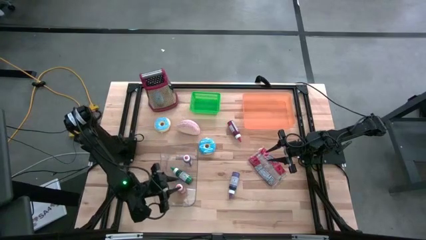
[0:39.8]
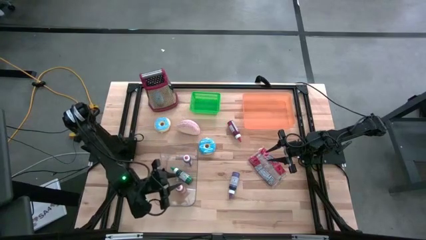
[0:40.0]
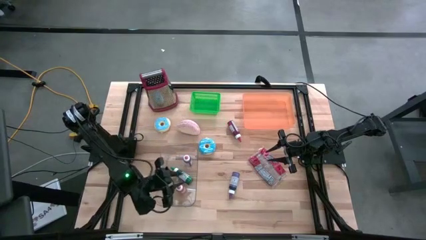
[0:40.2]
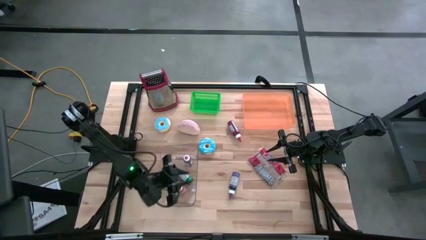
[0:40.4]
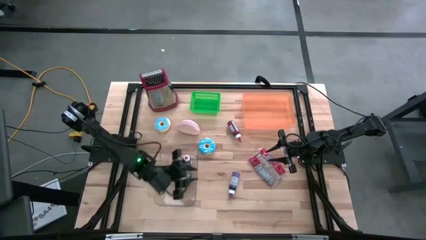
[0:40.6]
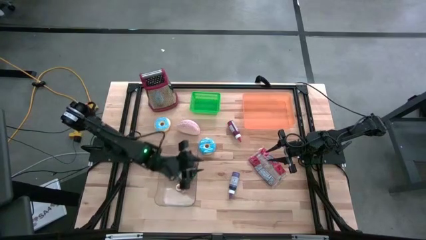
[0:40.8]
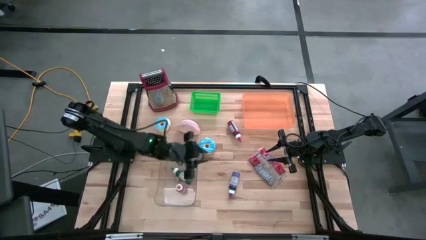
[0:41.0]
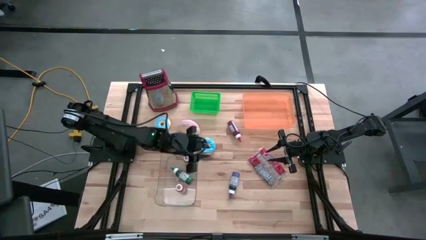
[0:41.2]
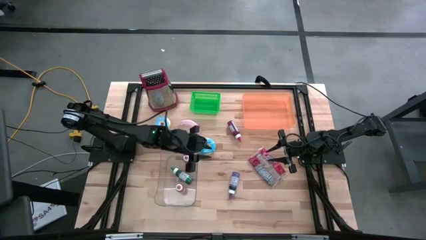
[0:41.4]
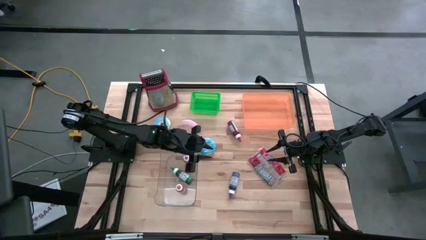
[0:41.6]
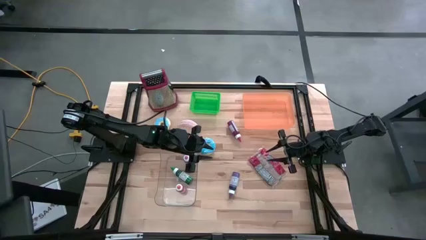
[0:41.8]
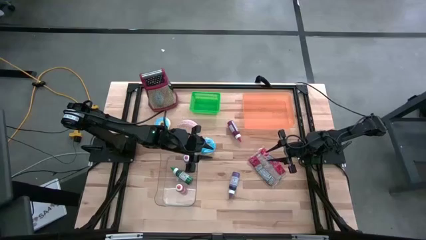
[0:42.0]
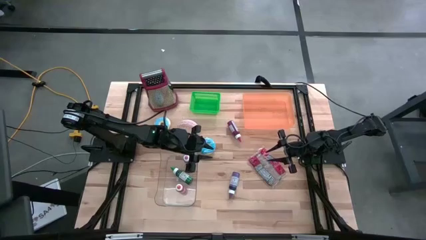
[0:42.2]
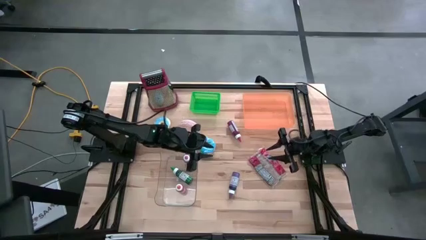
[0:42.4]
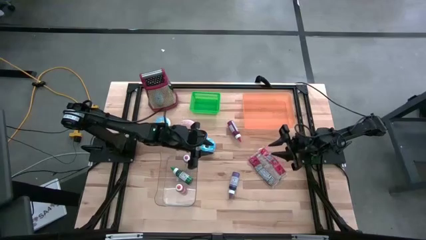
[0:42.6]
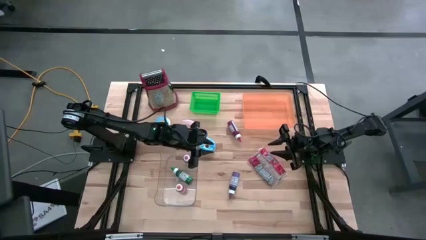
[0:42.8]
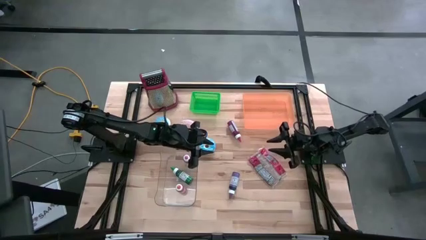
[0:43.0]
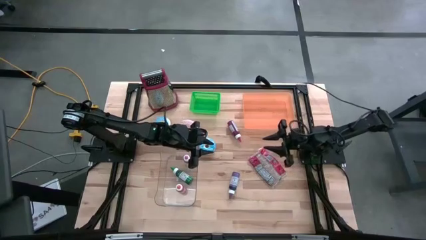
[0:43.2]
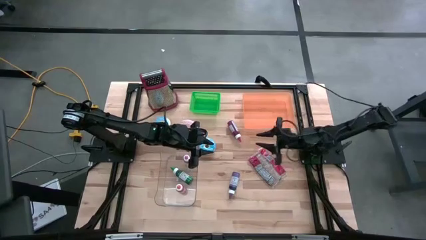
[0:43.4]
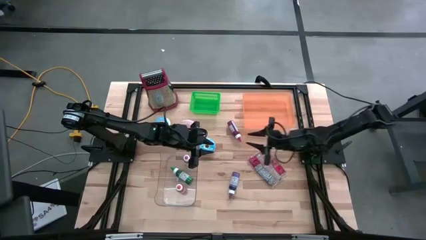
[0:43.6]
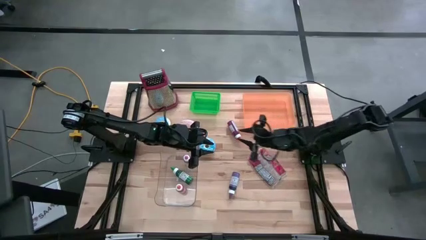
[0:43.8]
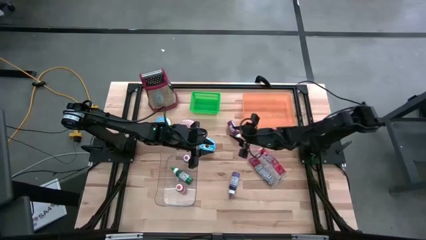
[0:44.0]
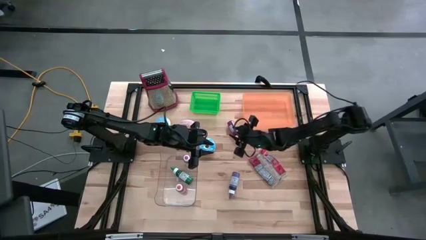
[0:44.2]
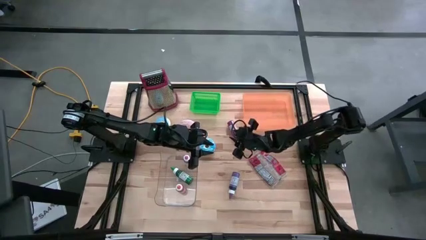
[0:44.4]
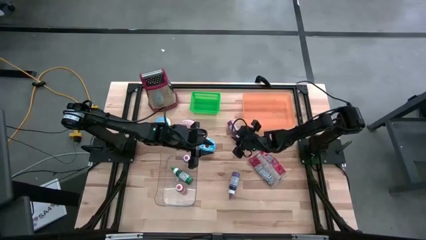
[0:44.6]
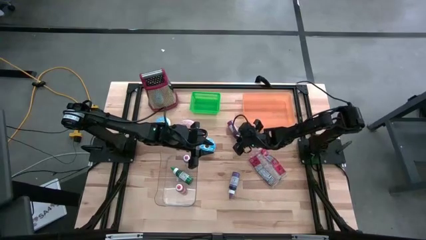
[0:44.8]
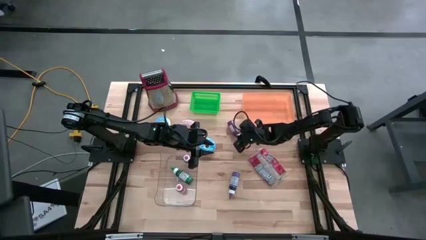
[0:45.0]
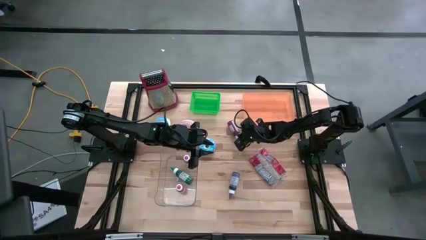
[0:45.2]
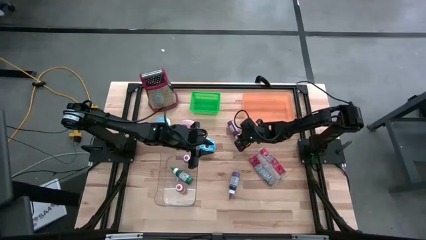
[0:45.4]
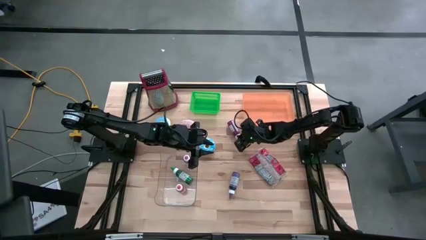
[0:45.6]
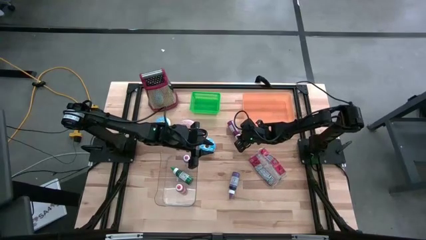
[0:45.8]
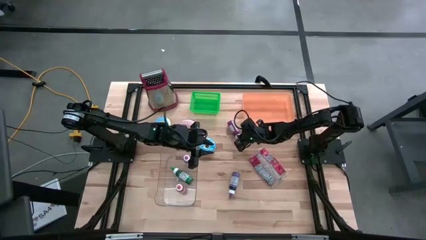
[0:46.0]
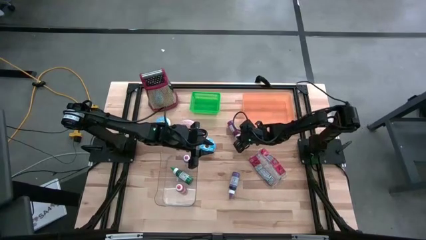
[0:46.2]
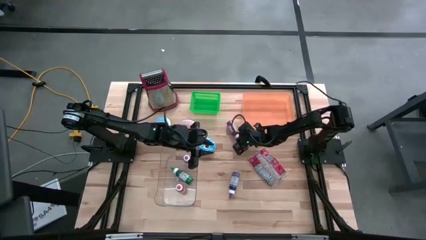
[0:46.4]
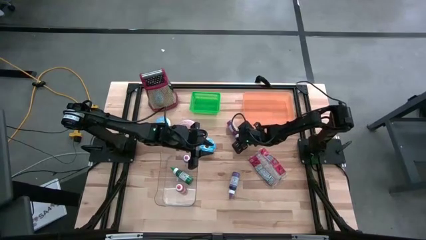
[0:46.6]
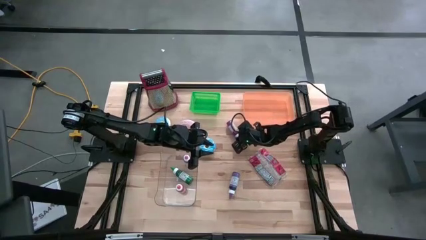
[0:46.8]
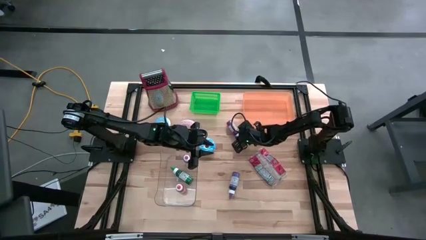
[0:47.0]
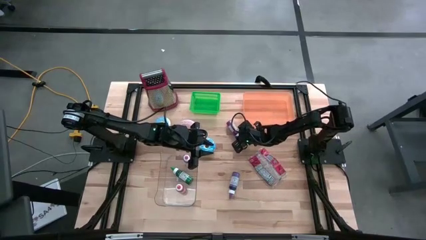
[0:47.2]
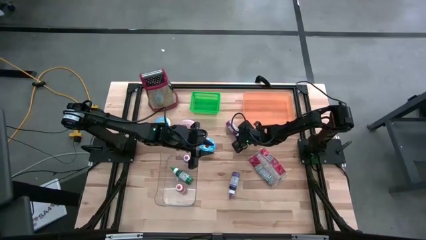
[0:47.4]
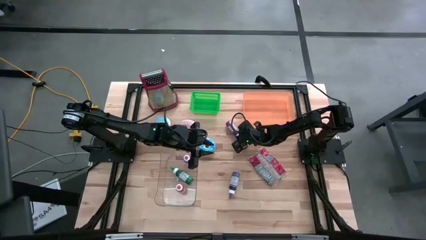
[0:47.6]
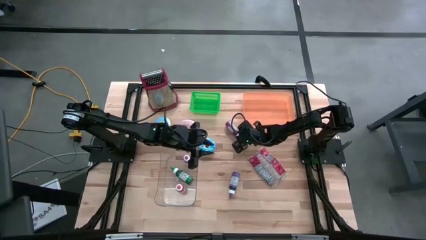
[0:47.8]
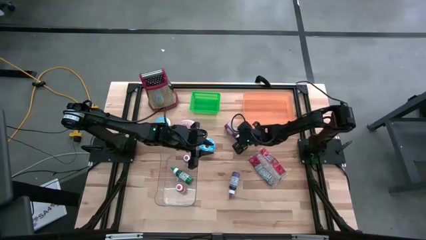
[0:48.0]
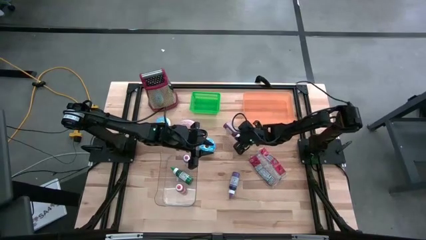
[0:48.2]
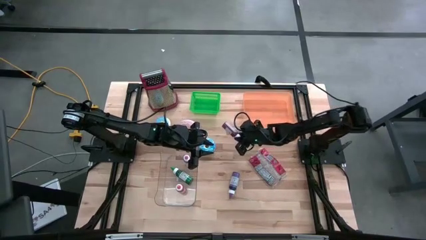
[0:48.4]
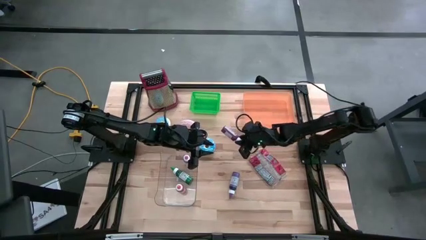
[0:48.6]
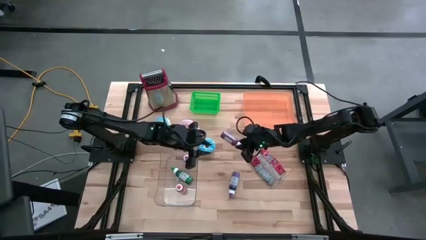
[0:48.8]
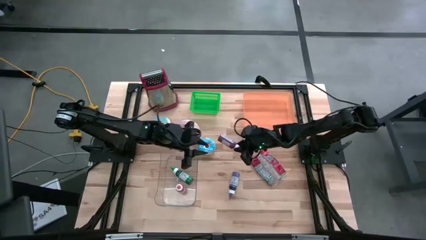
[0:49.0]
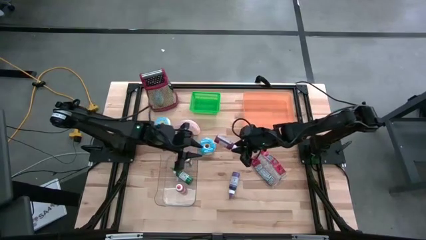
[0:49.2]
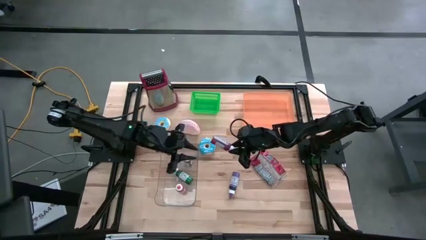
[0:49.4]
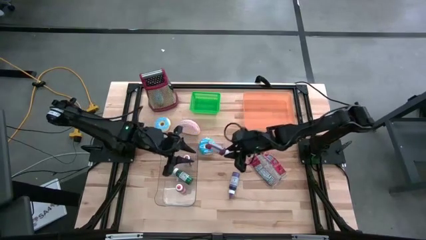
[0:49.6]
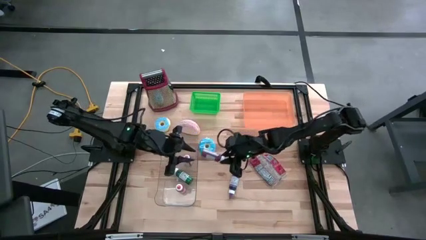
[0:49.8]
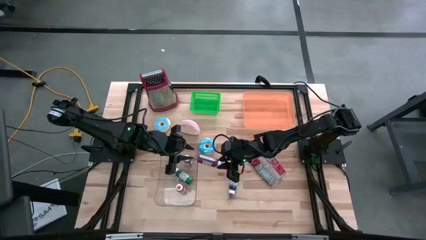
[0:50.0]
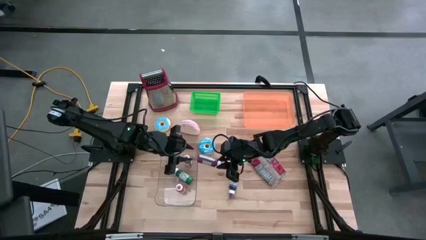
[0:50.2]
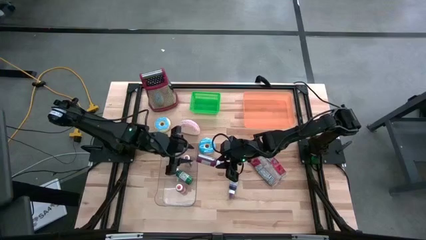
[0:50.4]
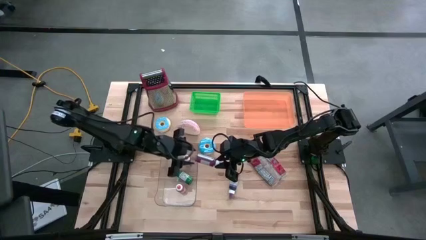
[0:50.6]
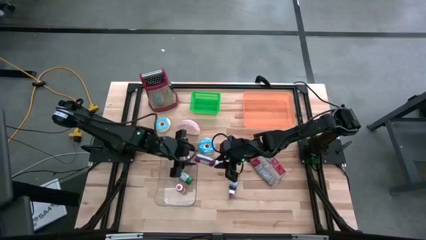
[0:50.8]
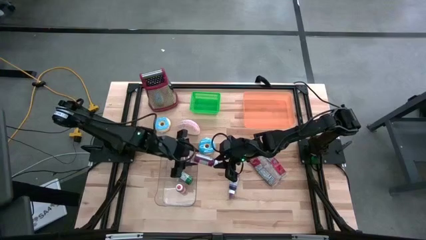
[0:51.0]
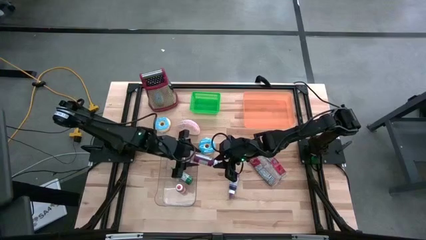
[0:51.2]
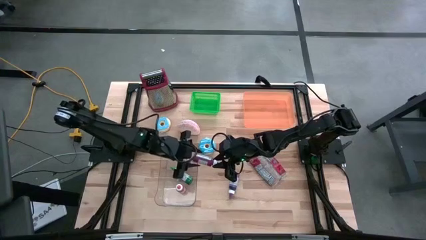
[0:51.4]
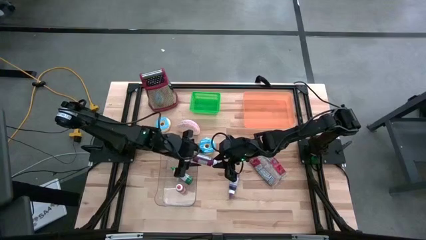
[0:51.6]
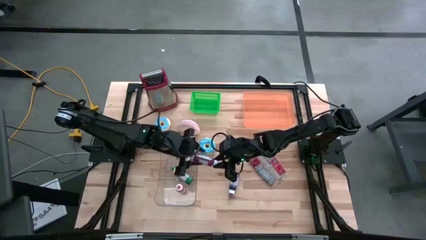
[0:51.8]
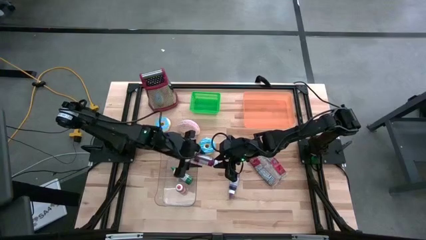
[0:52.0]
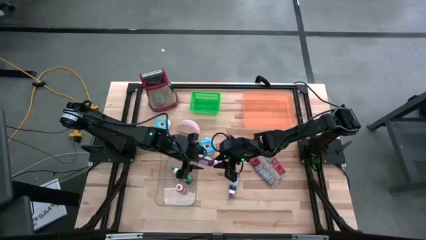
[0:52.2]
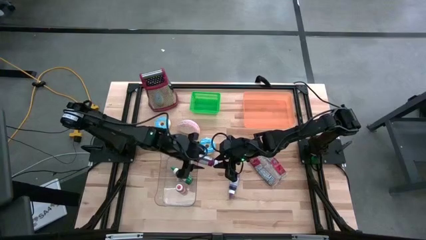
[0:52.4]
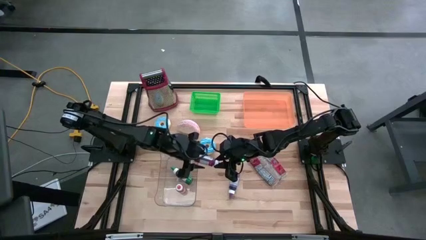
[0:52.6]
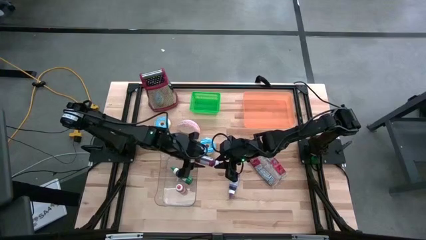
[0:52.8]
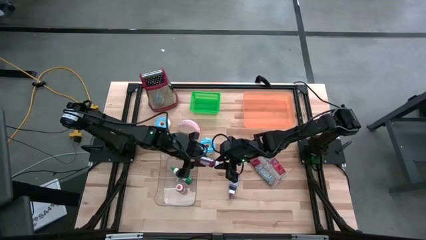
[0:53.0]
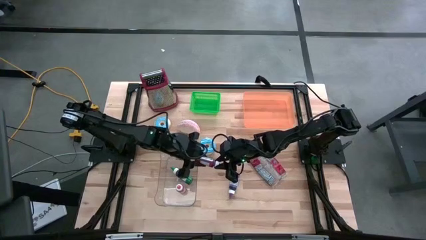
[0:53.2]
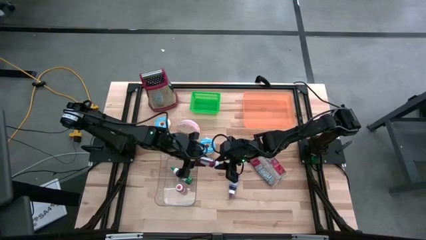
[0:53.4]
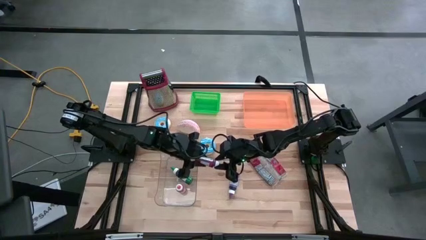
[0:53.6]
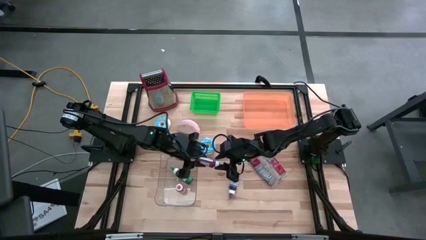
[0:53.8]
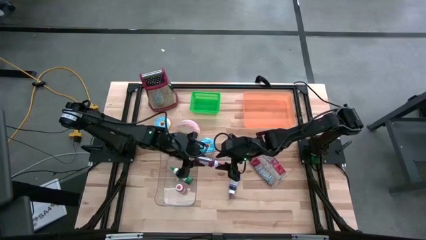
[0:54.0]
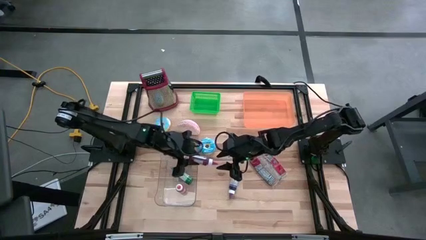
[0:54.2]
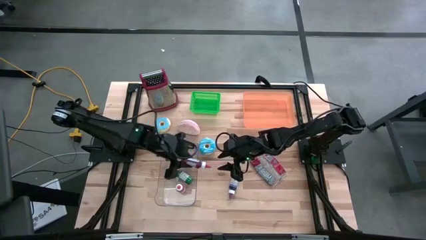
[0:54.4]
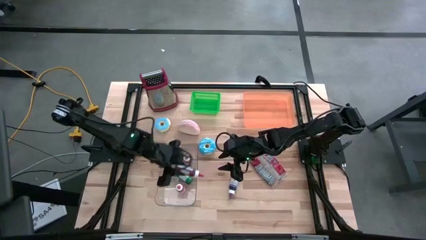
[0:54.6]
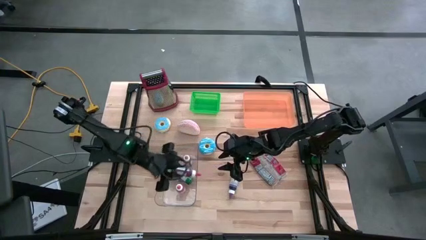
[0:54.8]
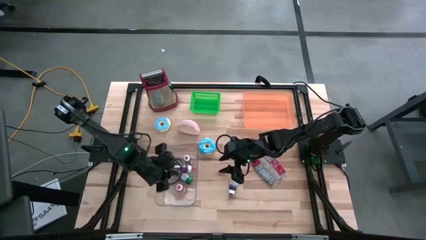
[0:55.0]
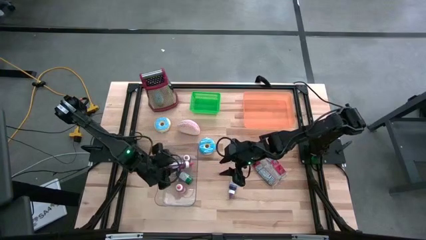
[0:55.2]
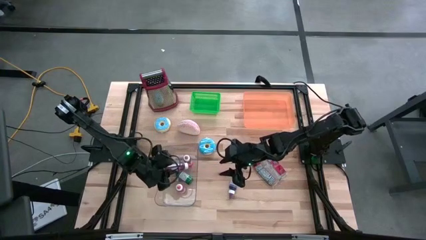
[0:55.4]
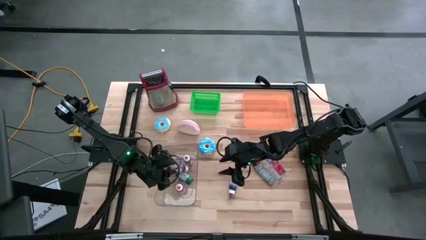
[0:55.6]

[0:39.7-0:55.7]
Put the red food coloring bottle into the transparent bin
